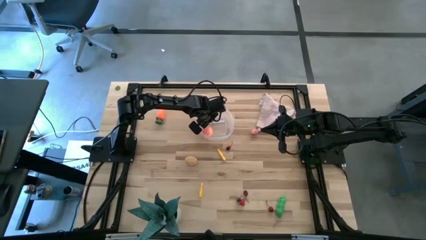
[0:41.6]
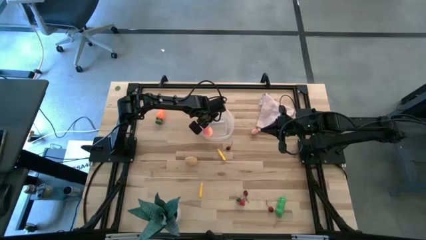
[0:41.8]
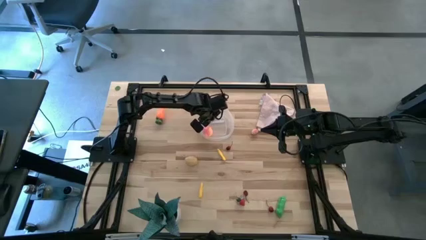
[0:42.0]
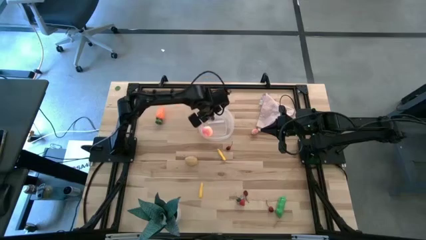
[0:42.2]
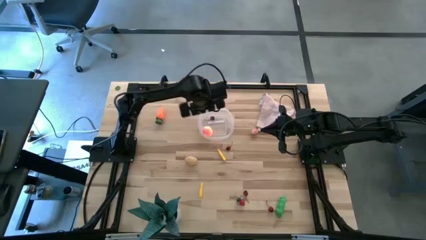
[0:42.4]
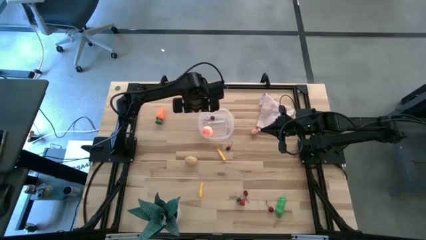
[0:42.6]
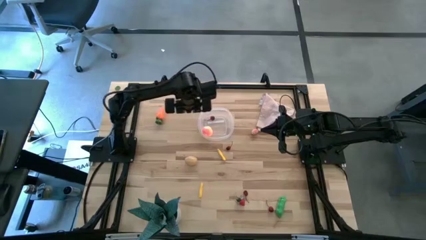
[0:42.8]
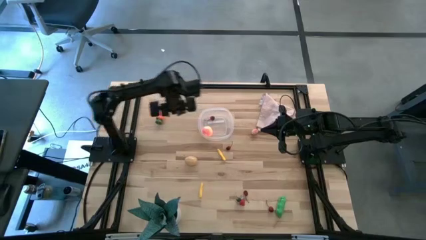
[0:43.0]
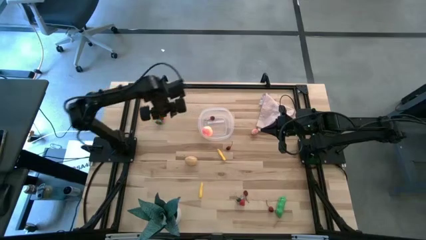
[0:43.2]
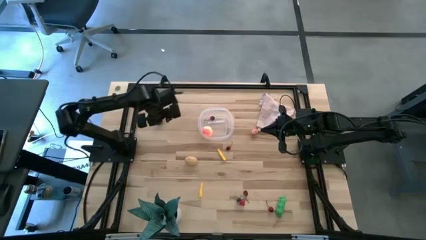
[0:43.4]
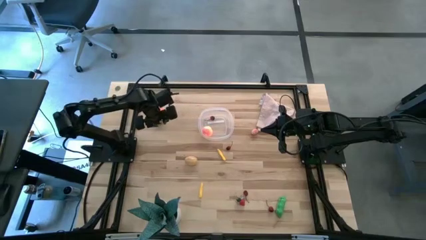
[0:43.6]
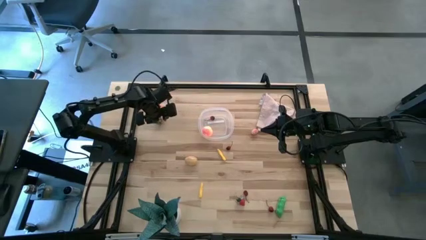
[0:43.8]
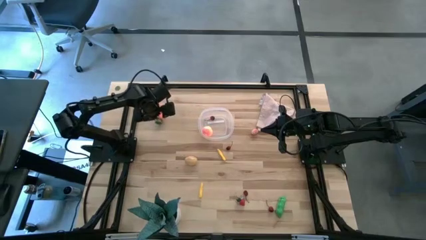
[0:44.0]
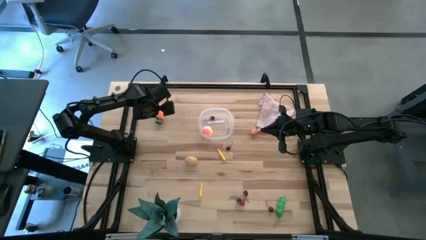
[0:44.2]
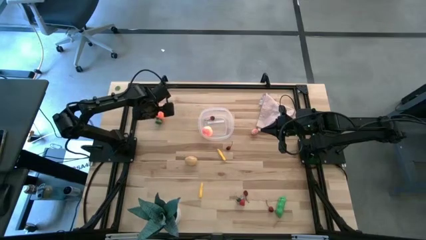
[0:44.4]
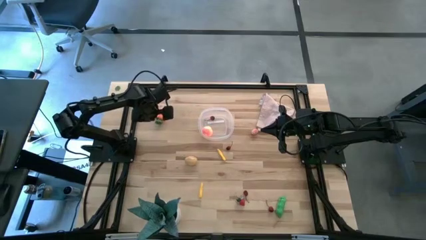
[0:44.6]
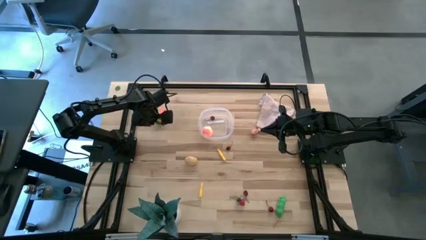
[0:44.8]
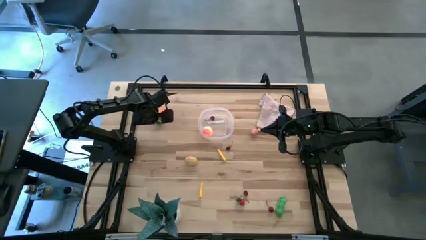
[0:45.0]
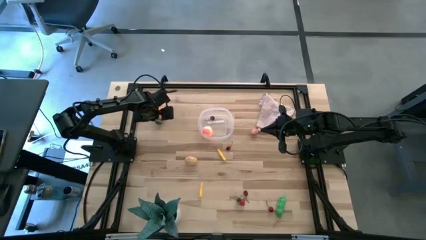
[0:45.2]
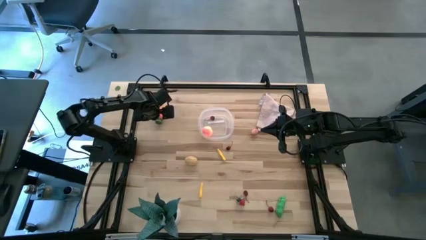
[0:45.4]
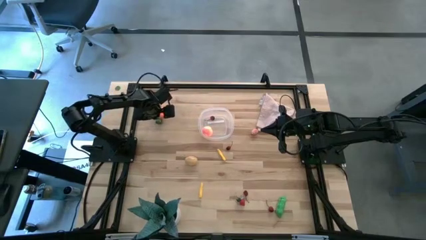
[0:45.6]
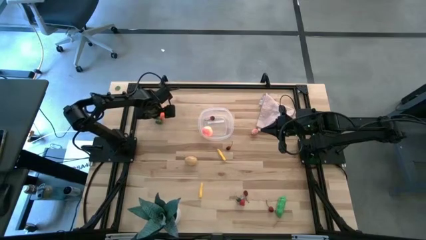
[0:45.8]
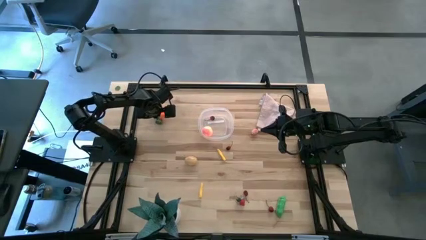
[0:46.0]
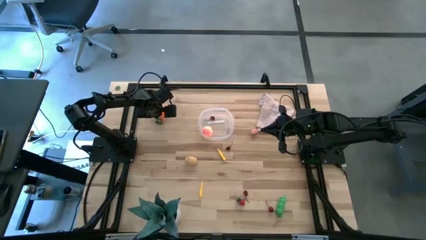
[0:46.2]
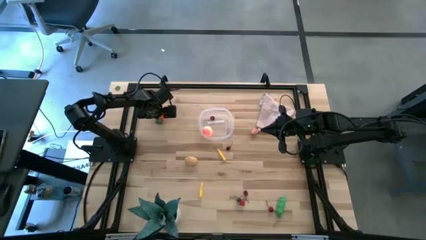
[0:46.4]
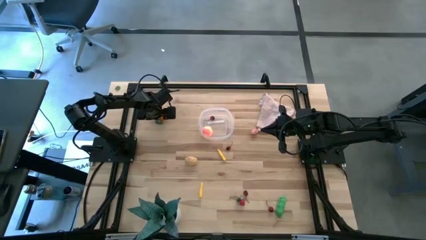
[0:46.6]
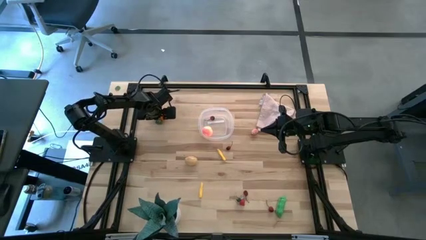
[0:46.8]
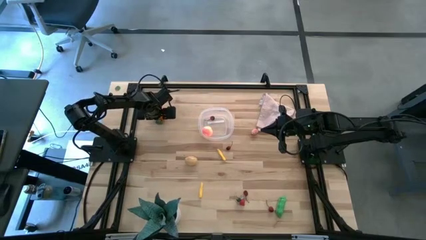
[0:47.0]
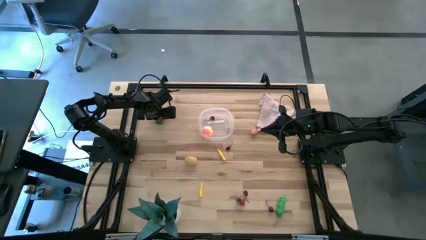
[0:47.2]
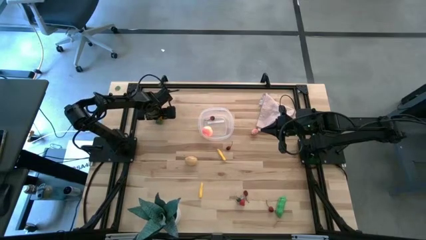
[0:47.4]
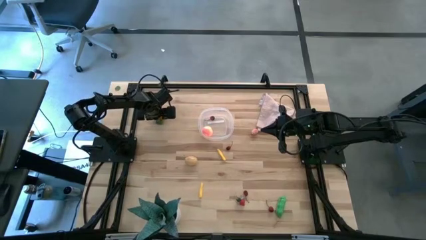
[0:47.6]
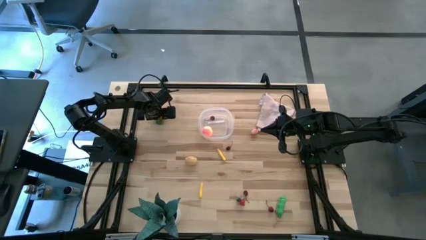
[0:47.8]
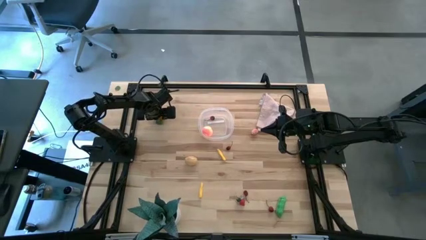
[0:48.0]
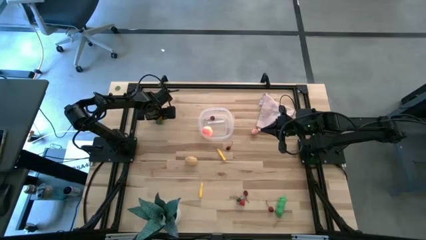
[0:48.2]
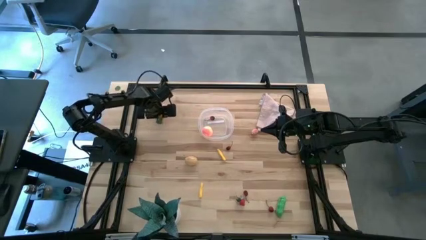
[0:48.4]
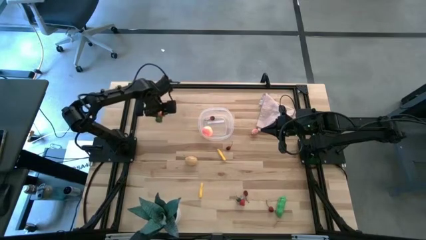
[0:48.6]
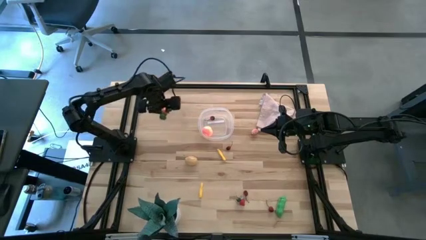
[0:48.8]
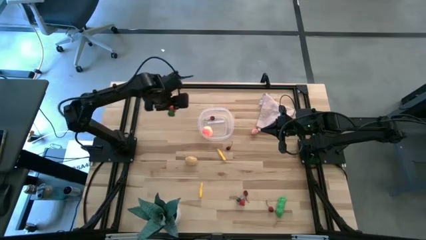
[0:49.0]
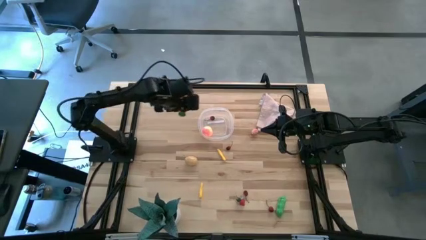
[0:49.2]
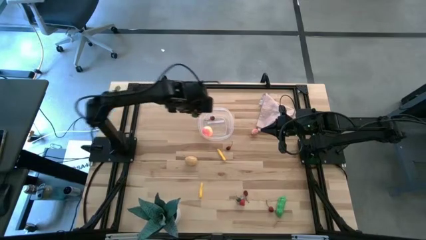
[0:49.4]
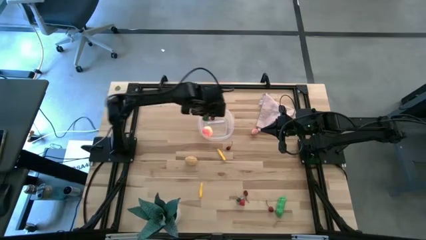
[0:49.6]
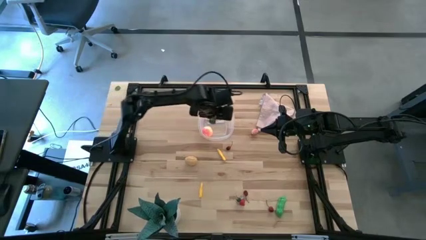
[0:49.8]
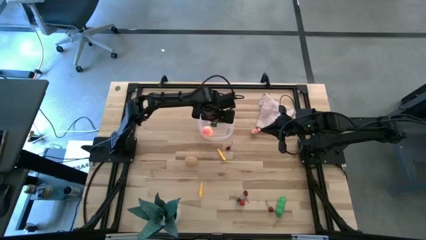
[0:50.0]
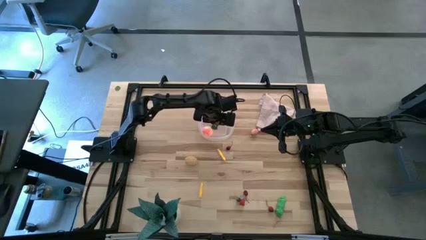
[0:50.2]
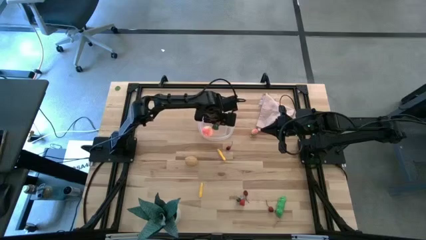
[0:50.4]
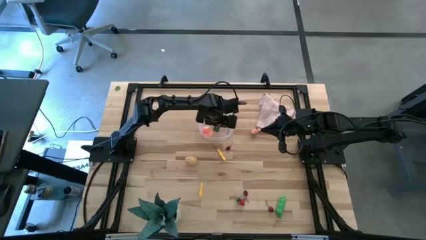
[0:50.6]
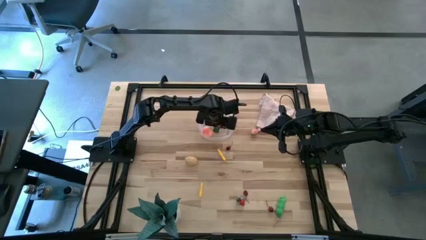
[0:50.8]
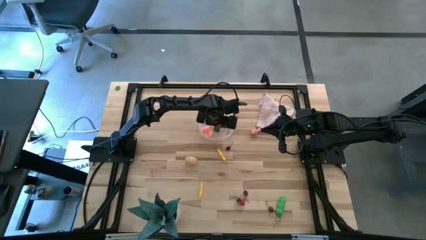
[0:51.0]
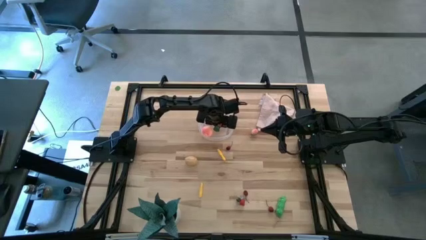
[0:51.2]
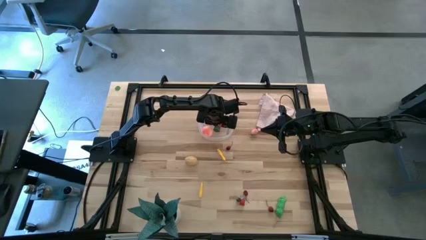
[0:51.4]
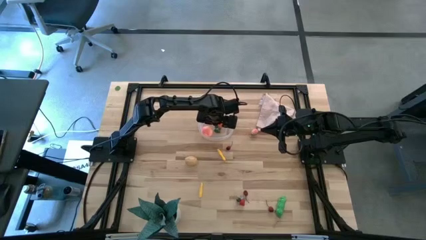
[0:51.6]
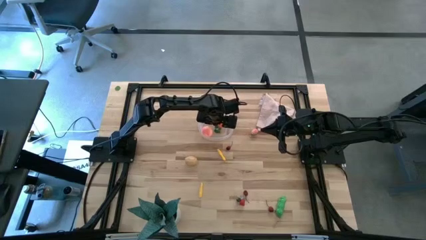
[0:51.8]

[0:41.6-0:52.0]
Task: Pick and placing Produce into tupperware
Put the orange carrot into the transparent bin

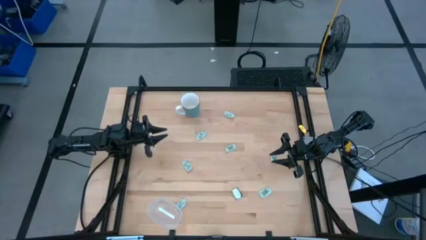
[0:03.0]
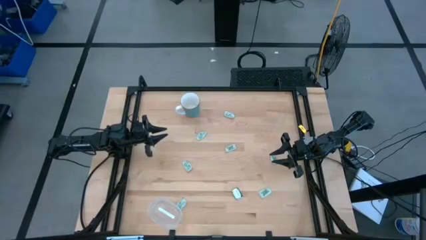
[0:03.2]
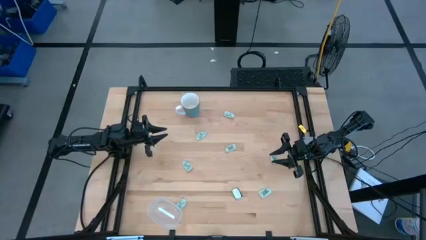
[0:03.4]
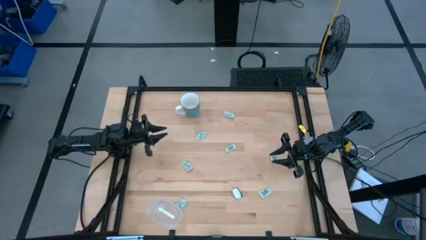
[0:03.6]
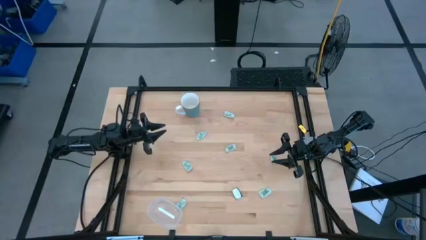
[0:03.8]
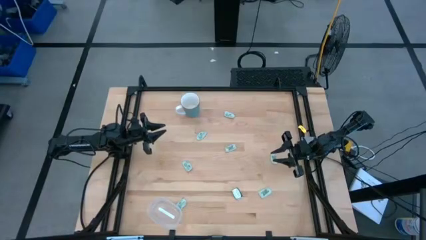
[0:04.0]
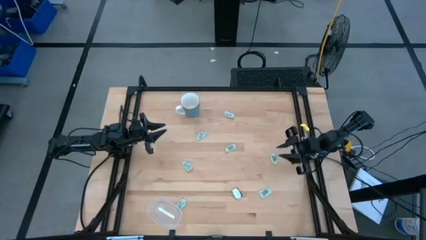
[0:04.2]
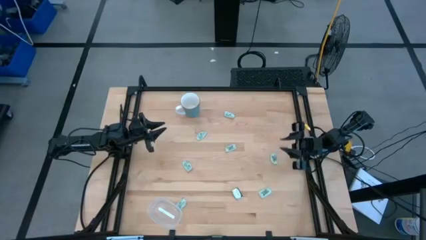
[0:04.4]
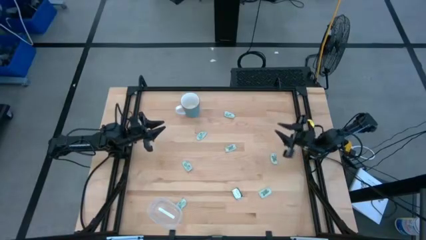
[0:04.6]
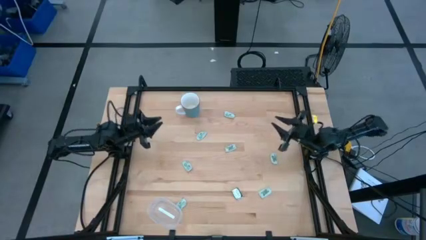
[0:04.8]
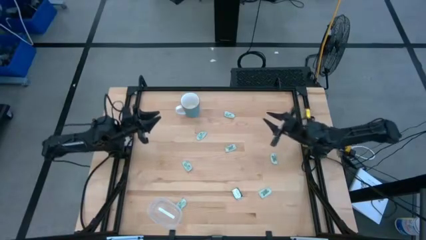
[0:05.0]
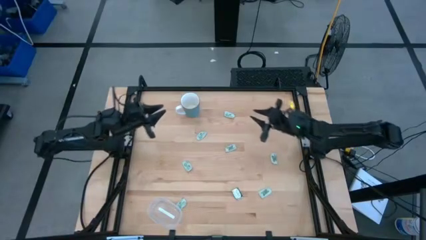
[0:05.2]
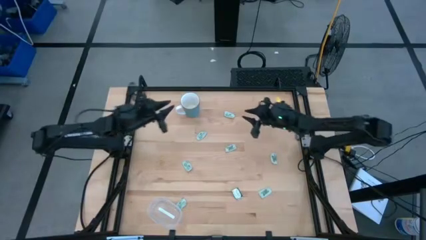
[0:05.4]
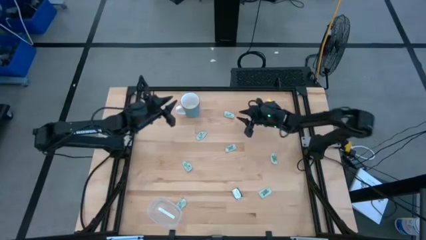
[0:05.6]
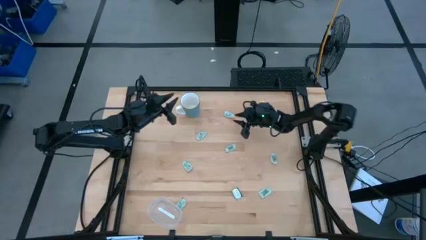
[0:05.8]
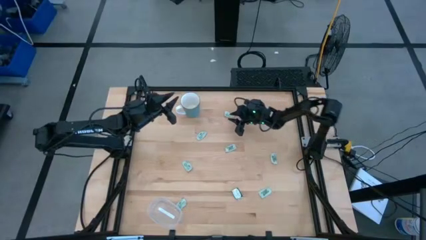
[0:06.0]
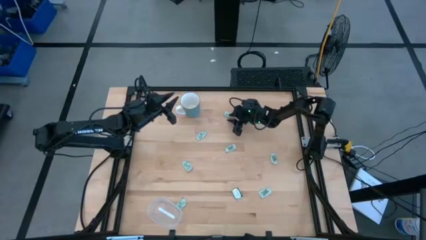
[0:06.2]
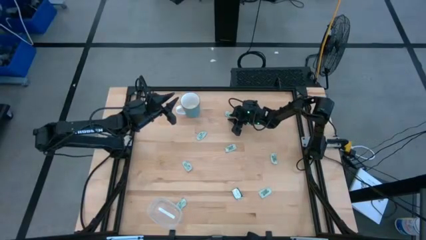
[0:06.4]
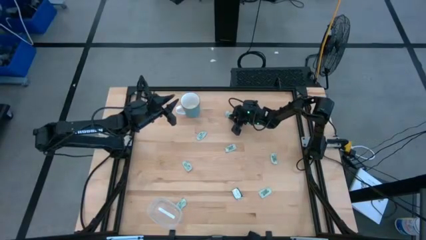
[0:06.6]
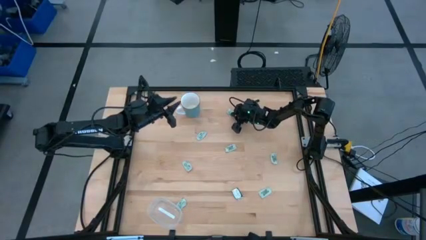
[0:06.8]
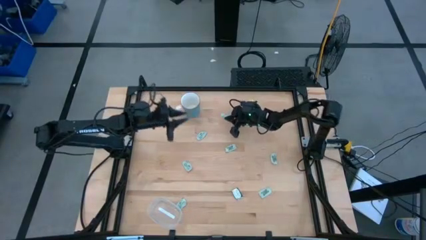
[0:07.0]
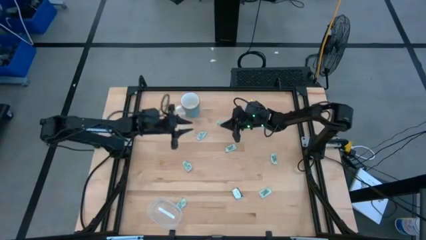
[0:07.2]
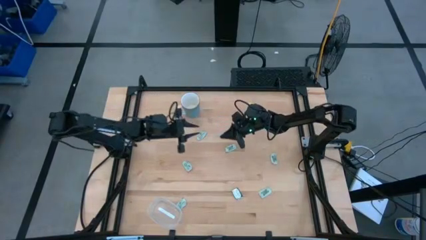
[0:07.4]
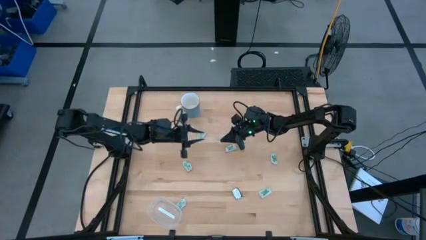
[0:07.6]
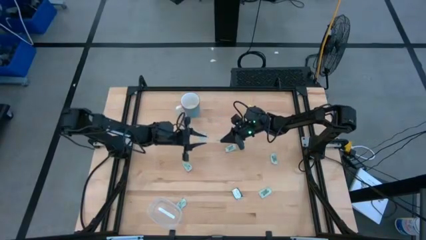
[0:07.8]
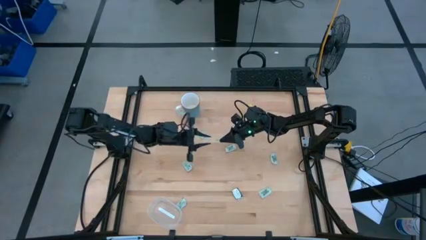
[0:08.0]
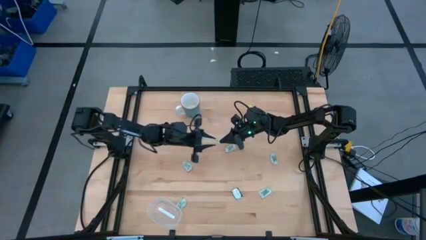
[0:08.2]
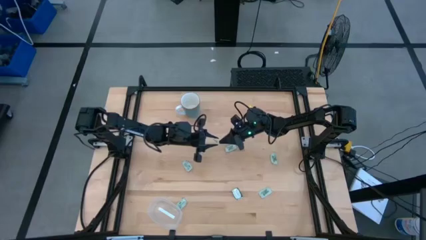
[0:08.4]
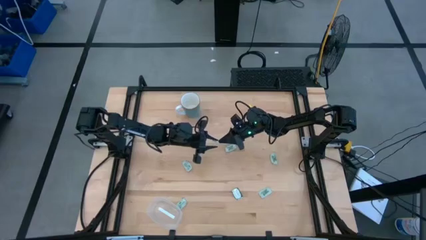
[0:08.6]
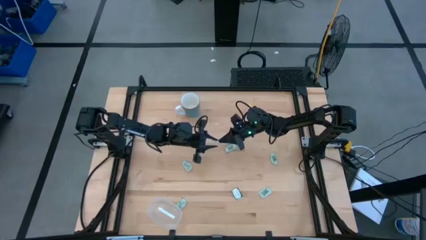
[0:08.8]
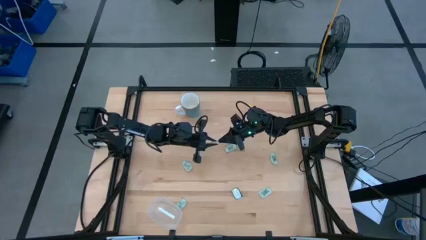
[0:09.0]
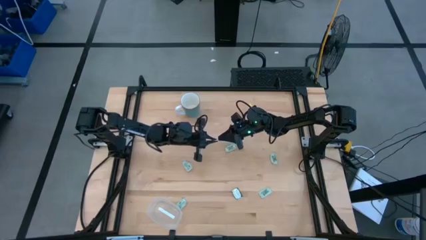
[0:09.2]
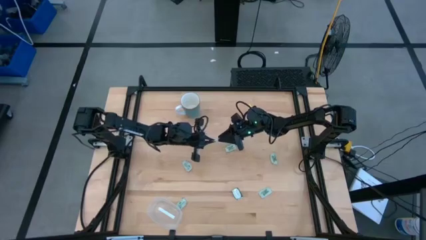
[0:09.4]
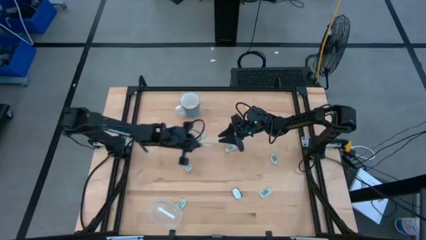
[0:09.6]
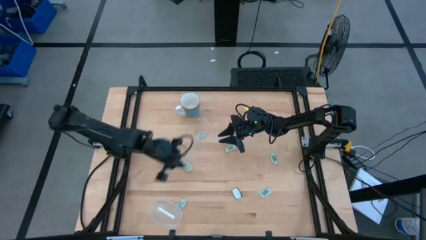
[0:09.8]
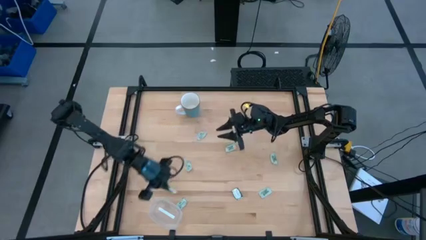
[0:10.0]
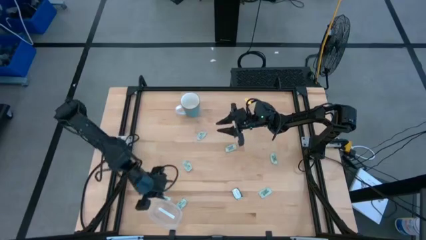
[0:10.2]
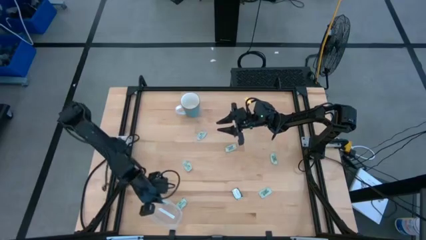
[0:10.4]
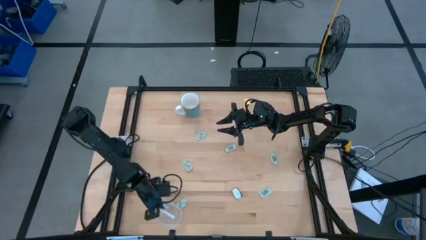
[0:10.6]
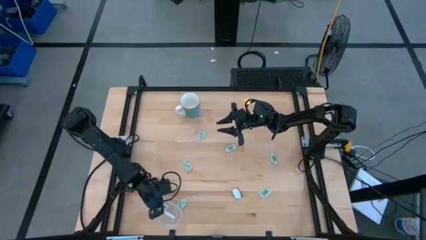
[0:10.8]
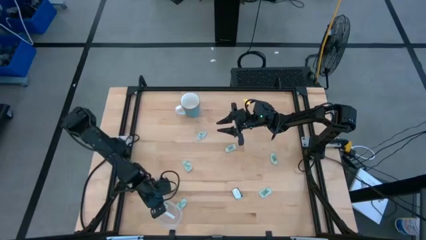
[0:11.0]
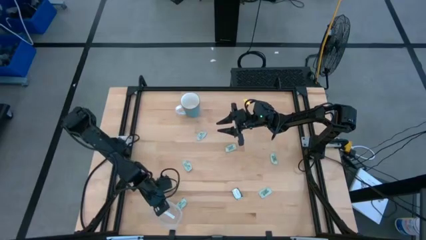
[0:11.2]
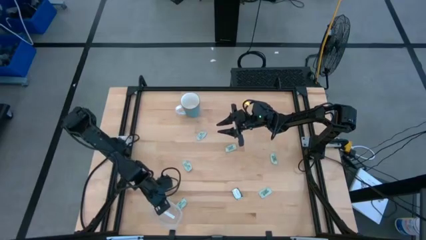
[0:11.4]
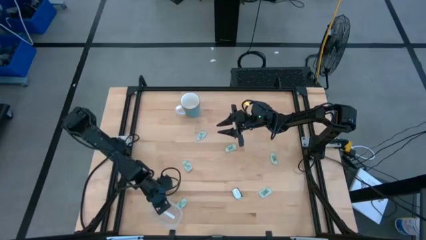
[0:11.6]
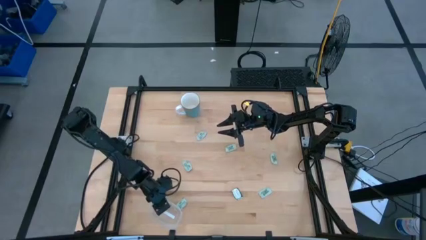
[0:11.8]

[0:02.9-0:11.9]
Task: Pick and place Stevia / Truvia into bins
Put the stevia packet into the transparent container
